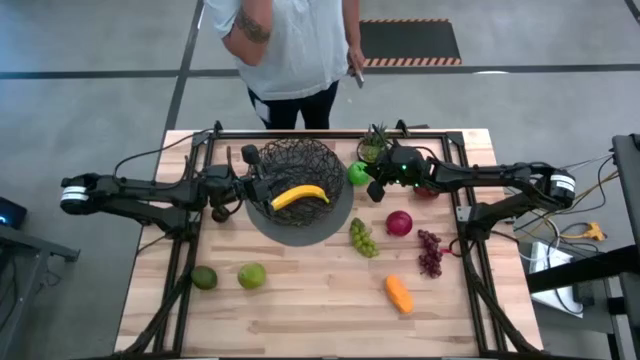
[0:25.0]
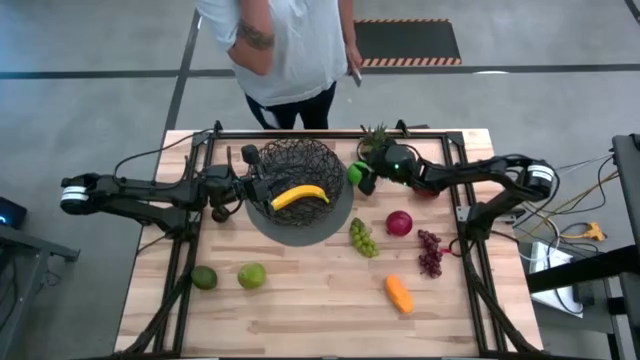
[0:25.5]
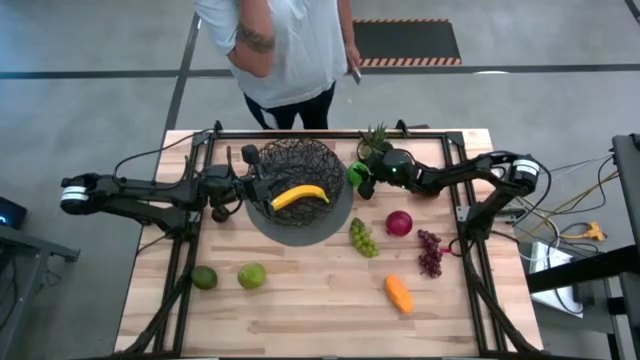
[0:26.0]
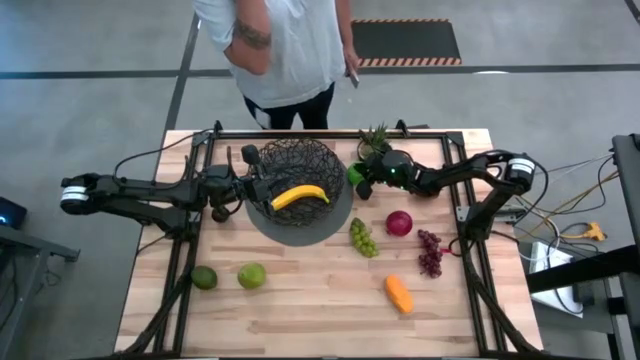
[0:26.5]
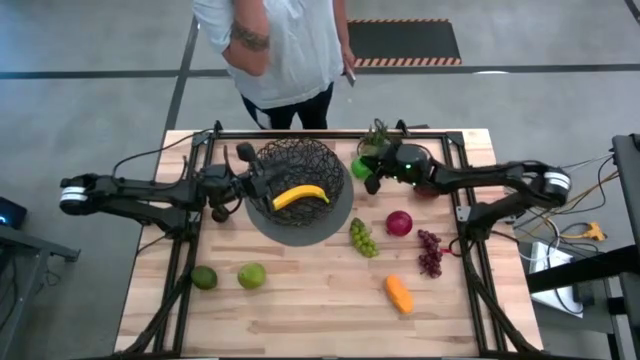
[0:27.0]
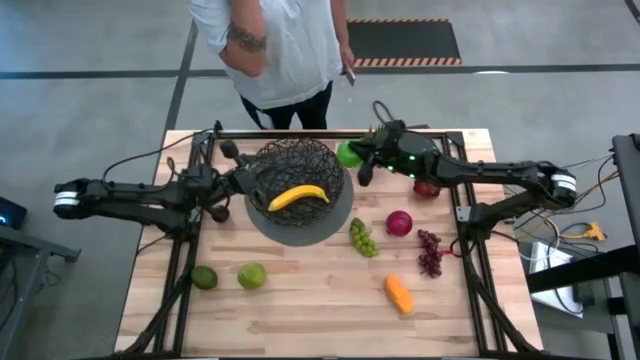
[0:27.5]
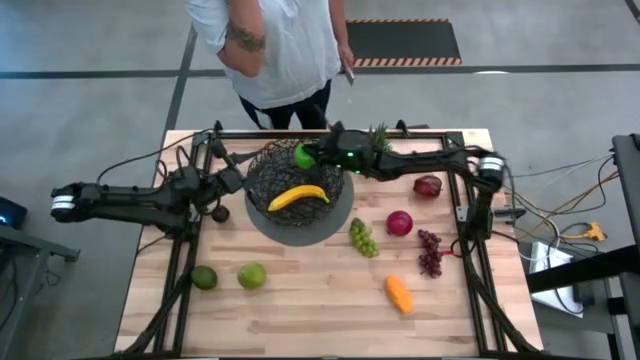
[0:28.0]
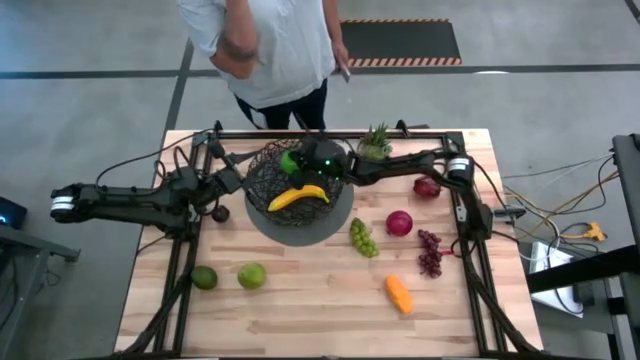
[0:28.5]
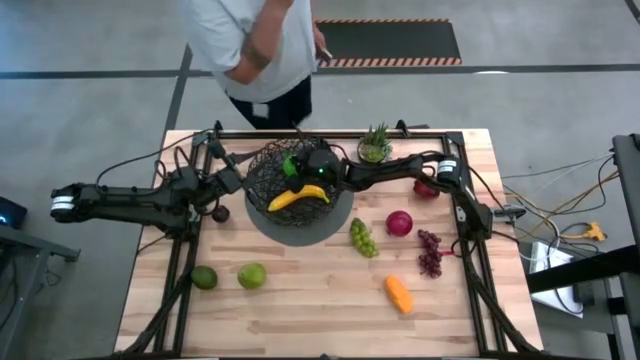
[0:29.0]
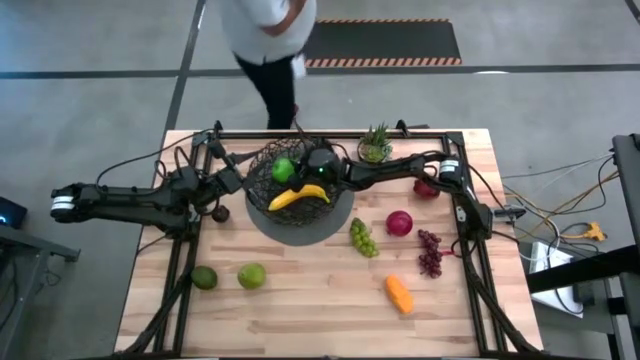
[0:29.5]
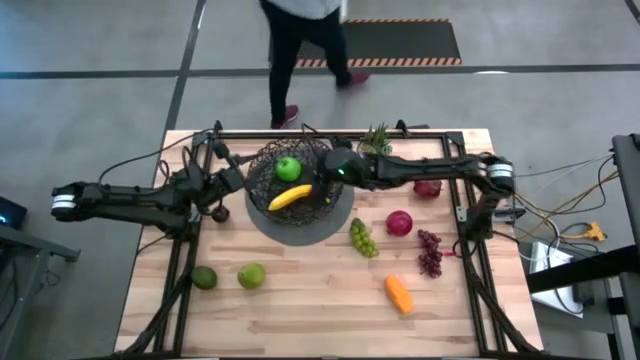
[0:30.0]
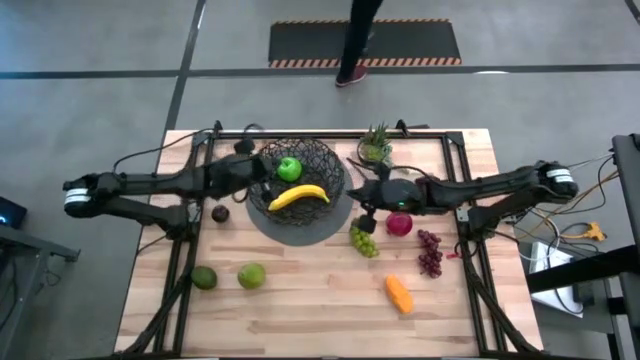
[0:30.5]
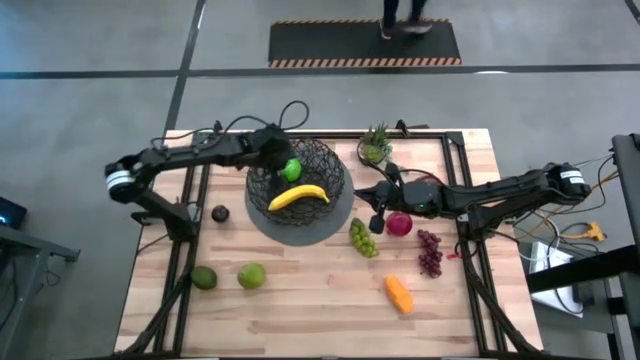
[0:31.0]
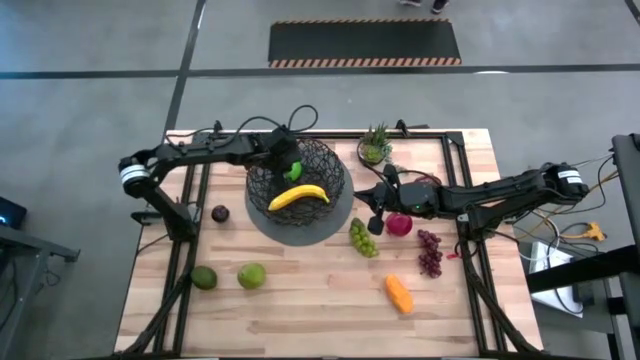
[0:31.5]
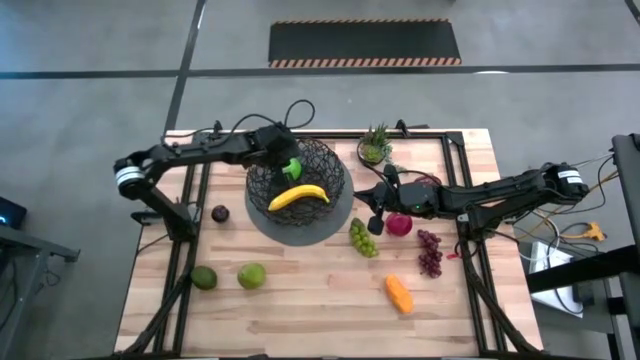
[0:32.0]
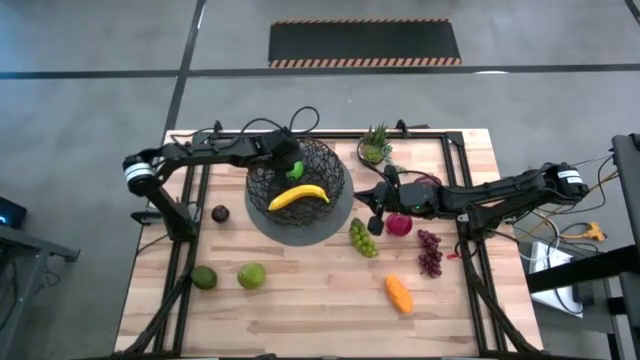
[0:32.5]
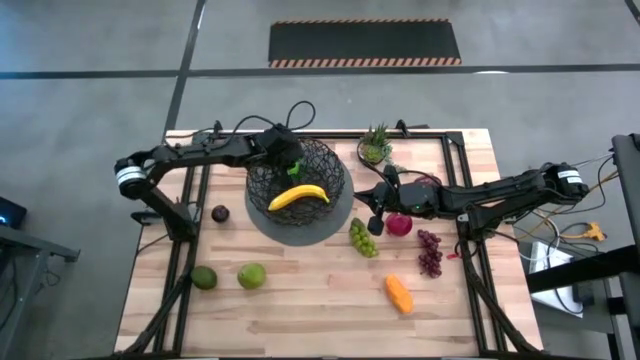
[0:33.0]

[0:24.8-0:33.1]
Task: Build produce basket
Put the green apple into the black wire basket

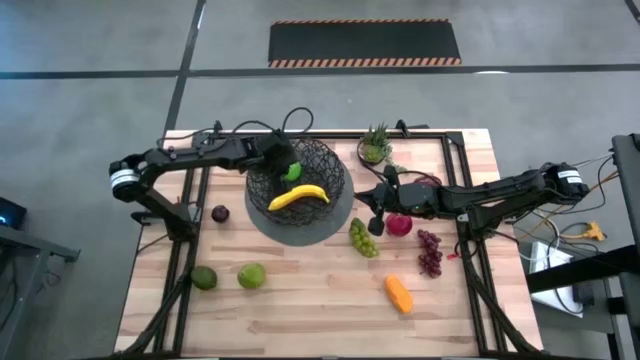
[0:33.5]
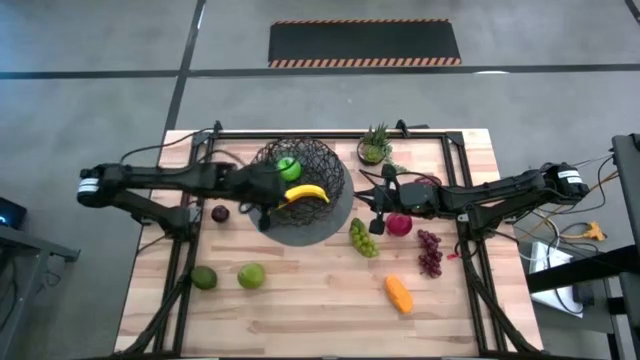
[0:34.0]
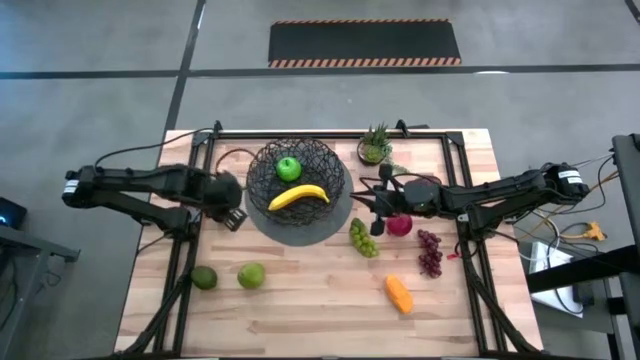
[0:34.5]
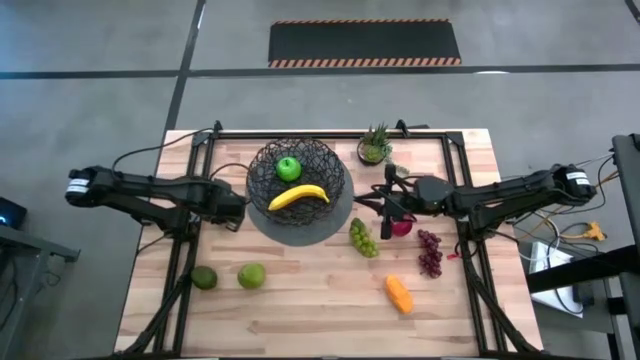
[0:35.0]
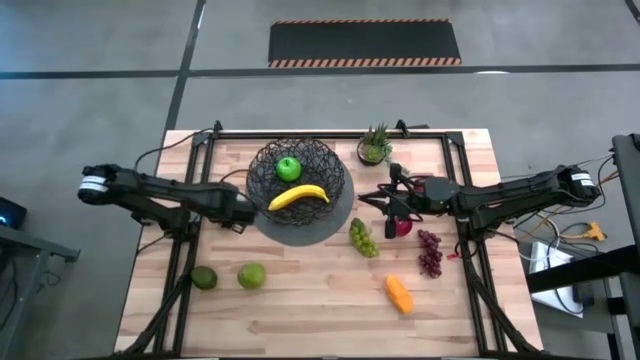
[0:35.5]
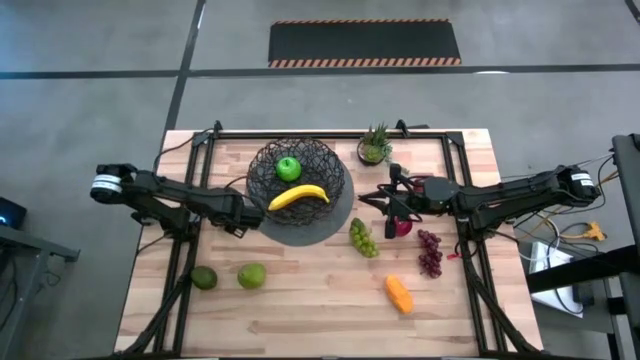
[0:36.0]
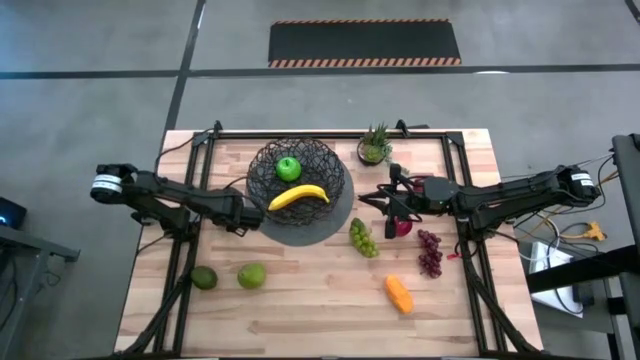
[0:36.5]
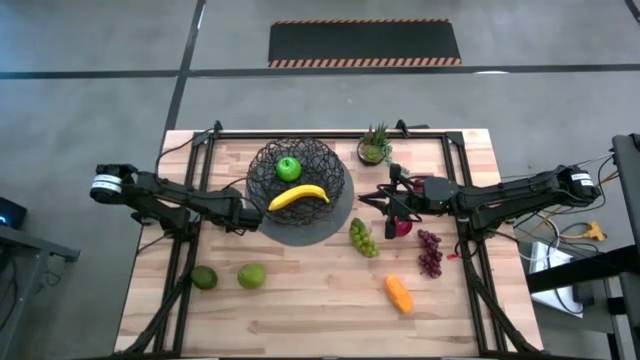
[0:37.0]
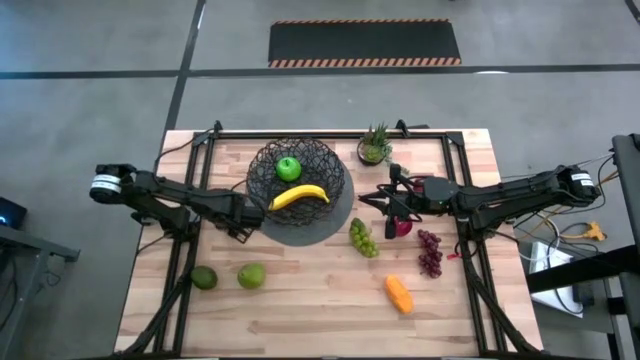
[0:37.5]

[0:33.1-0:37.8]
Put the plum into the black wire basket

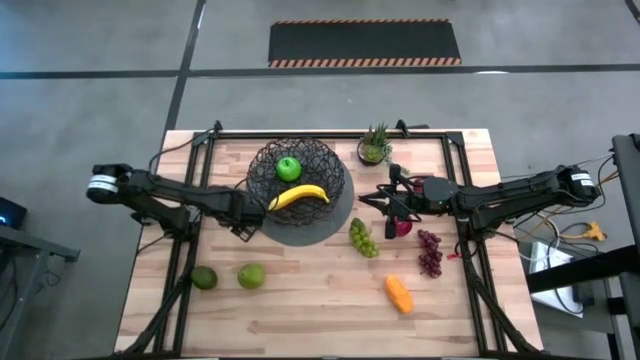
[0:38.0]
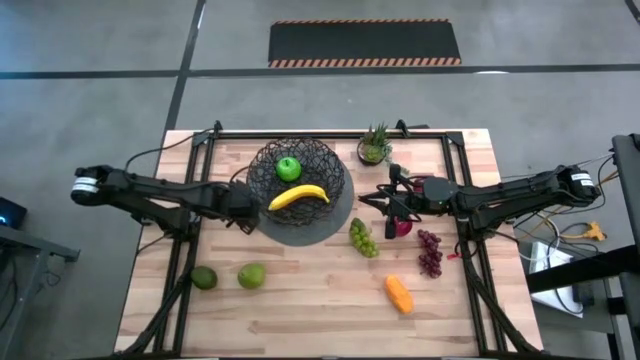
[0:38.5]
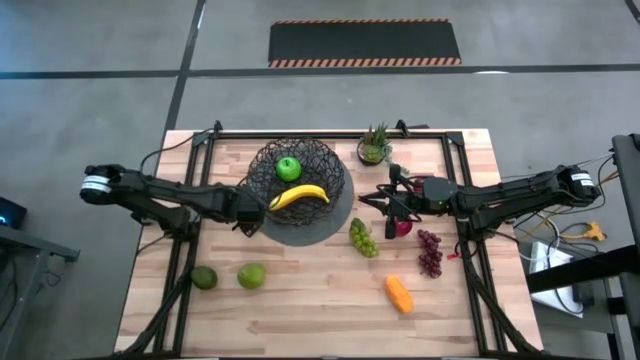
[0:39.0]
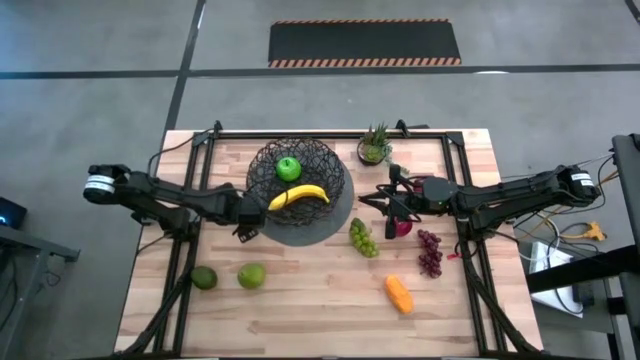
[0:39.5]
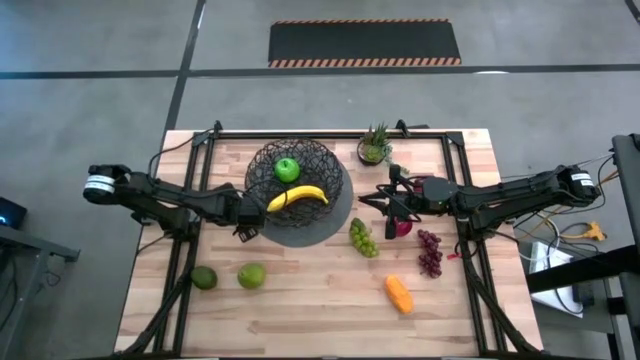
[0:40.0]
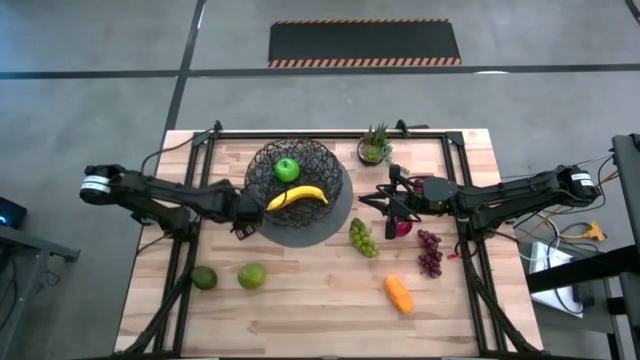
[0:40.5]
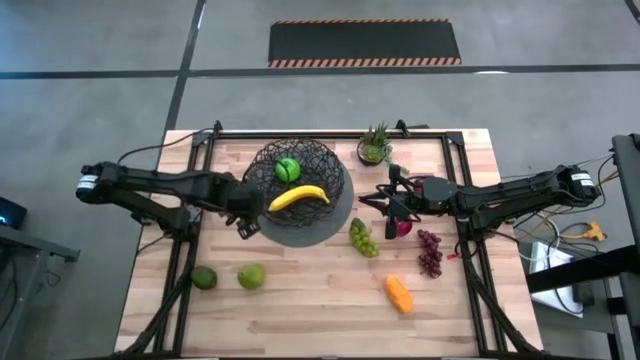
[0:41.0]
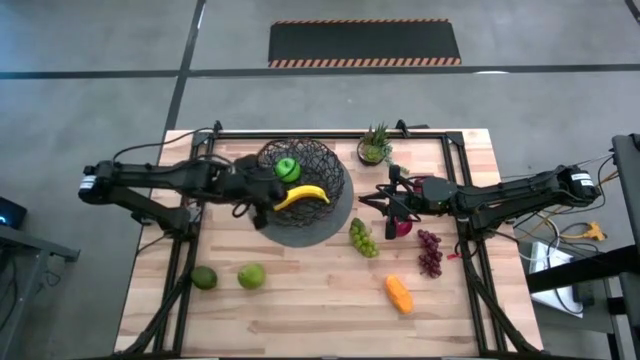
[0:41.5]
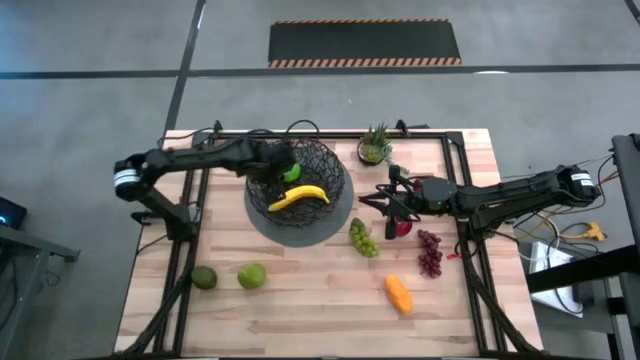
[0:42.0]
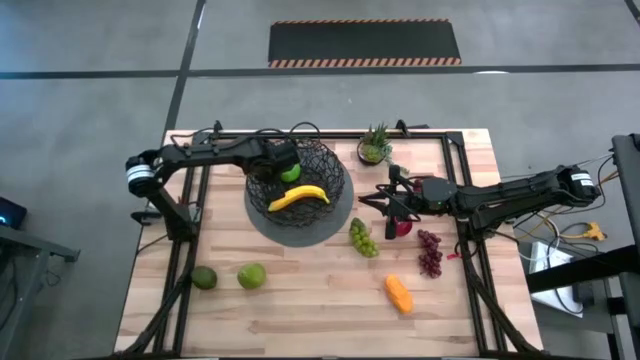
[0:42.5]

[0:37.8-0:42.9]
Put the plum into the black wire basket

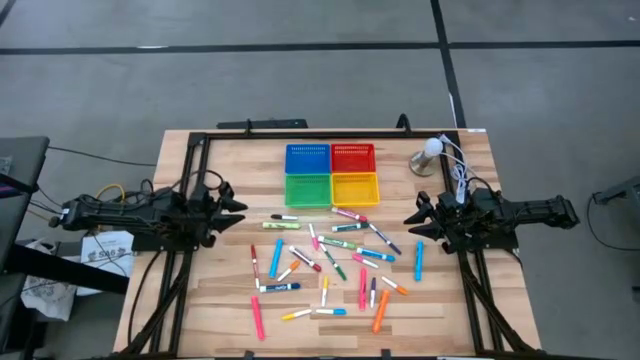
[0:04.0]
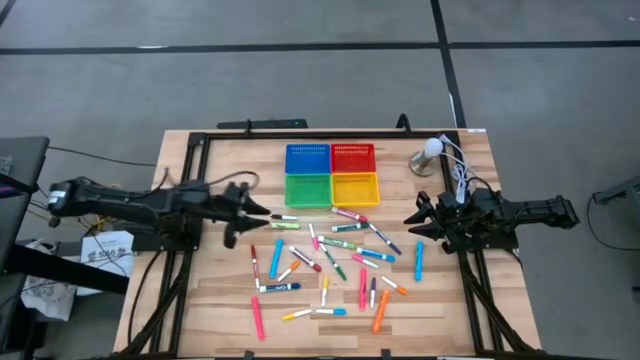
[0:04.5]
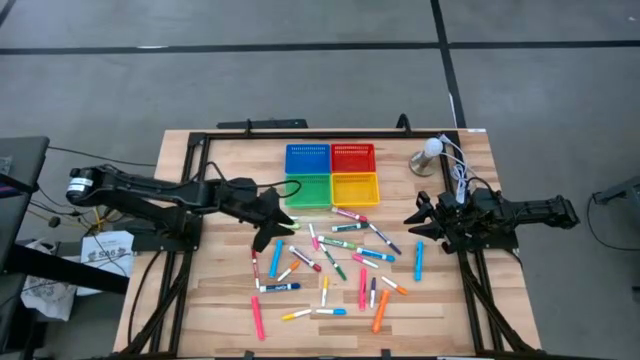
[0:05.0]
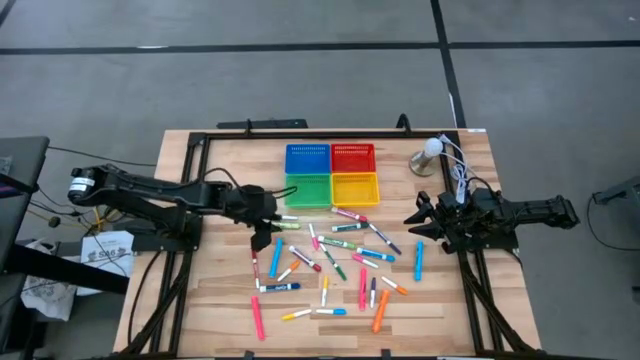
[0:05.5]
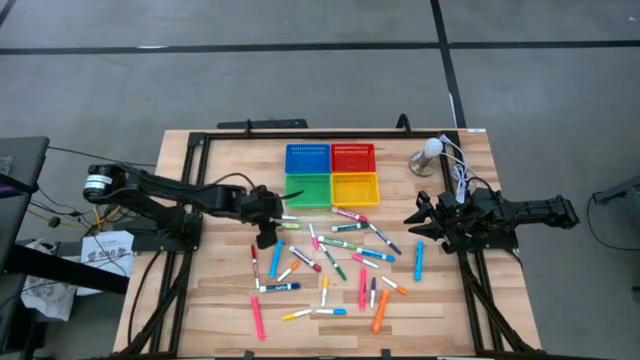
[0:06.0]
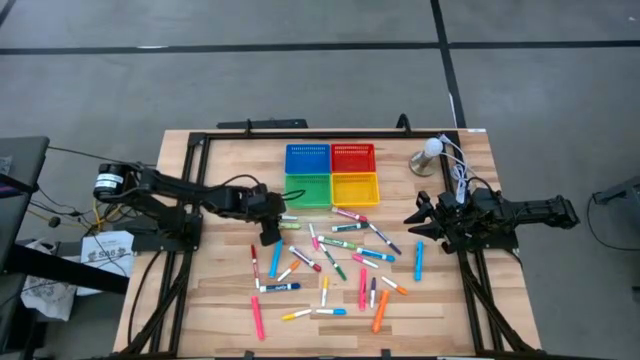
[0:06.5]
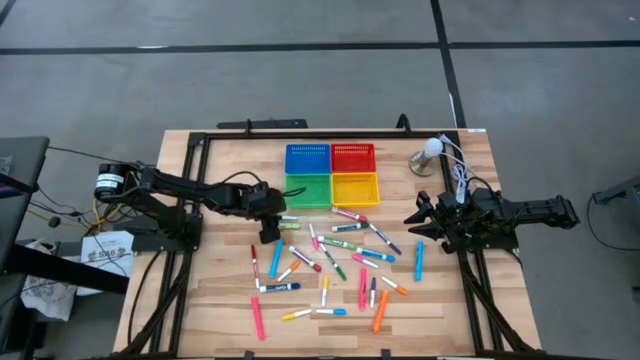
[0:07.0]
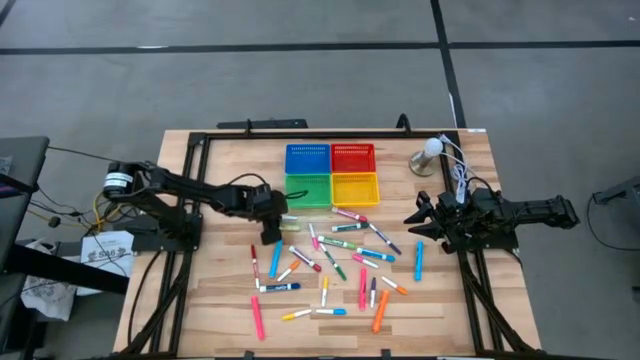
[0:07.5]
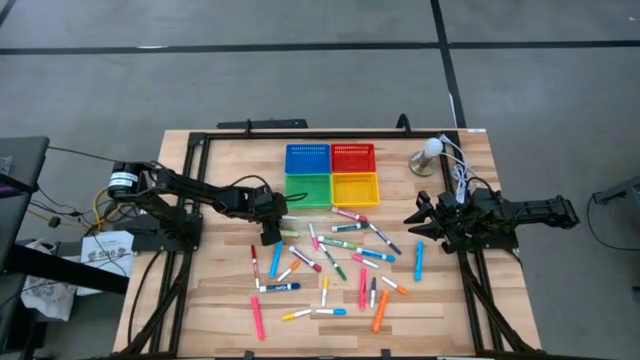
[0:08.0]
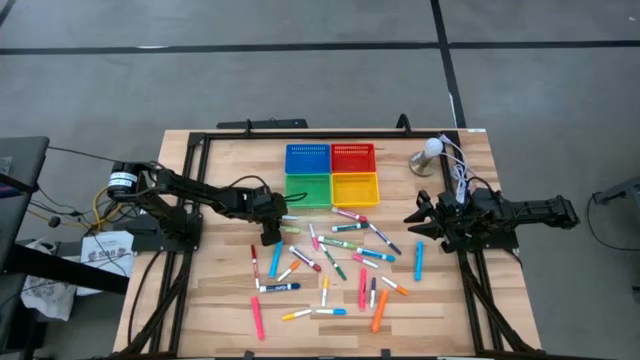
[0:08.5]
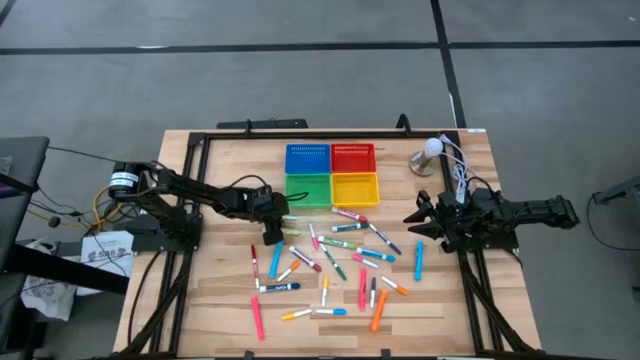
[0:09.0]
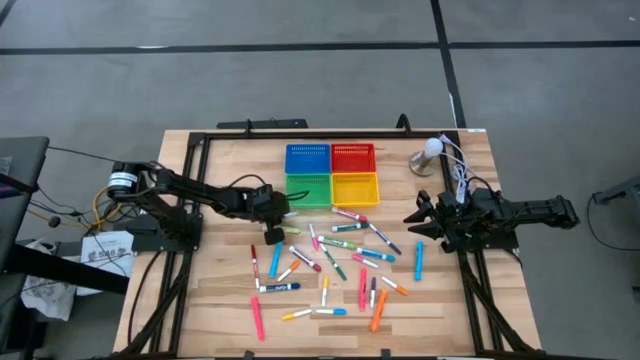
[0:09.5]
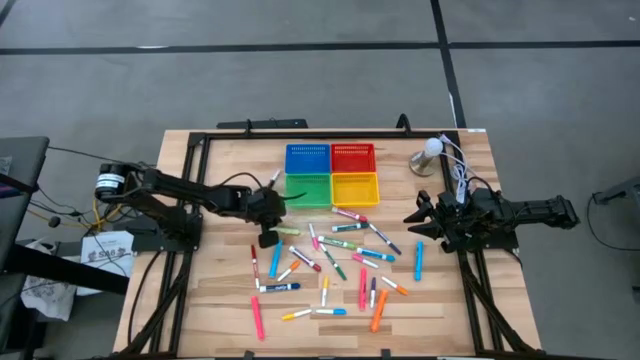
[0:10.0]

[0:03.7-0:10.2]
Task: Pick & Place Markers
Put the black small marker into the blue bin
